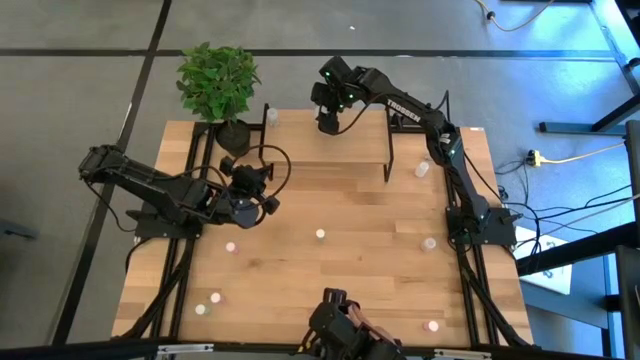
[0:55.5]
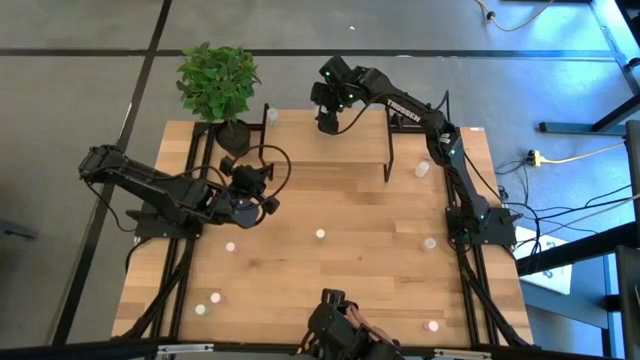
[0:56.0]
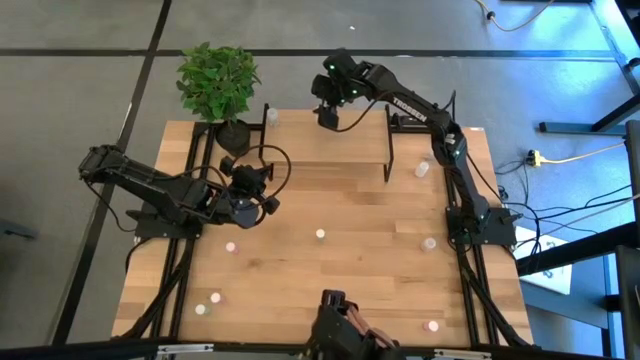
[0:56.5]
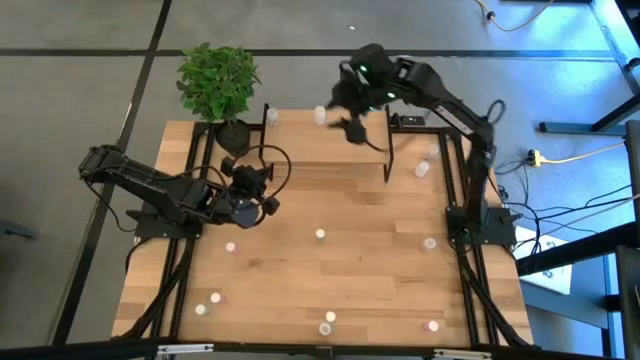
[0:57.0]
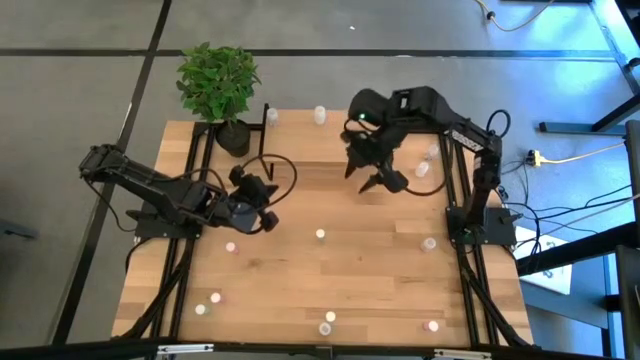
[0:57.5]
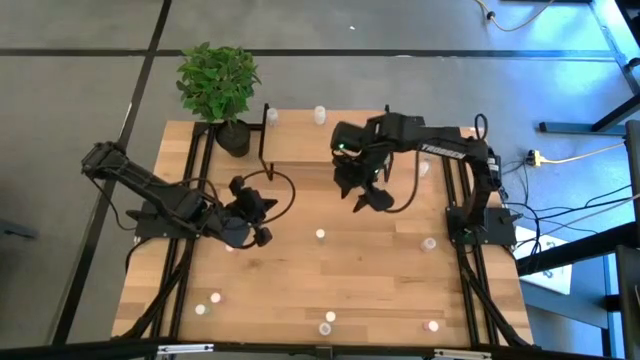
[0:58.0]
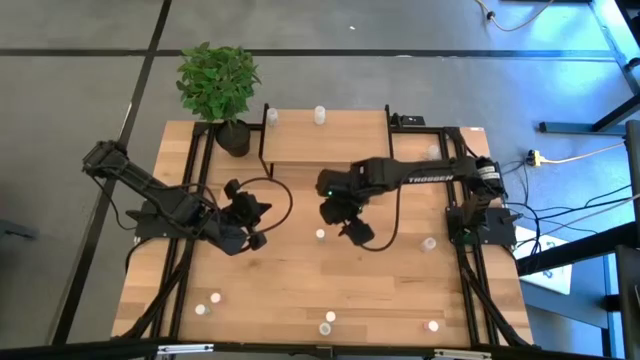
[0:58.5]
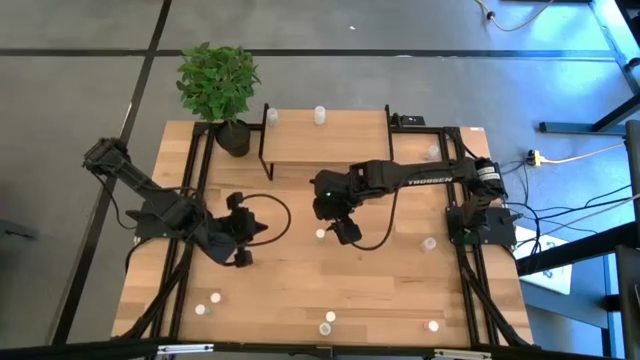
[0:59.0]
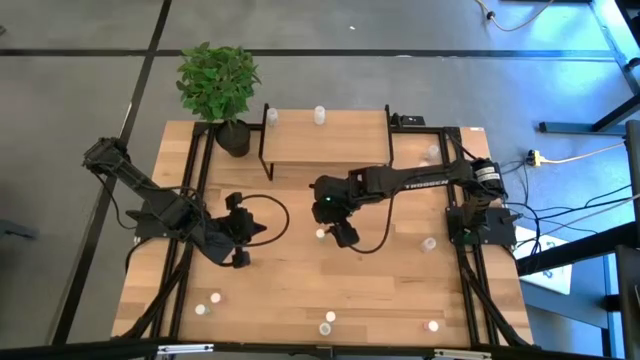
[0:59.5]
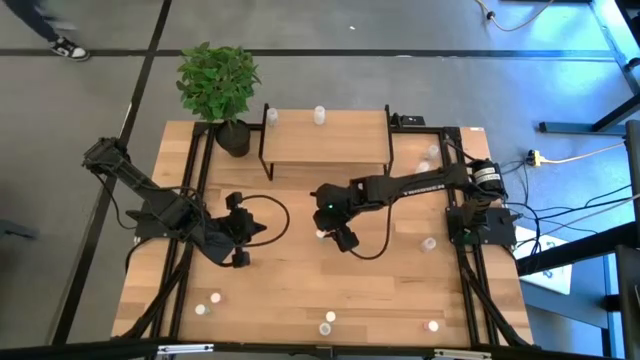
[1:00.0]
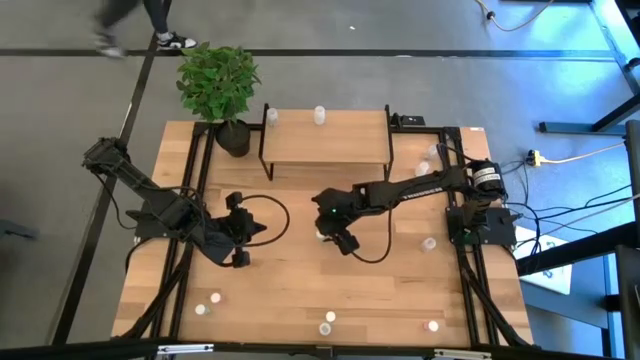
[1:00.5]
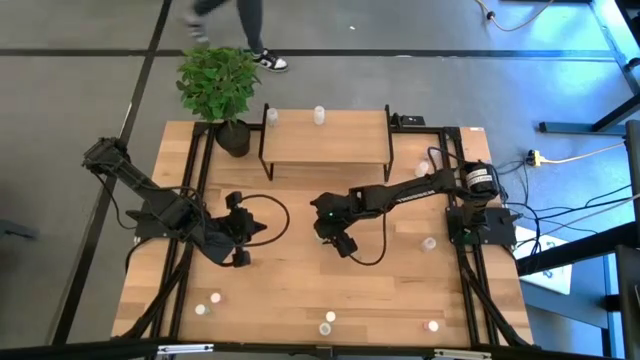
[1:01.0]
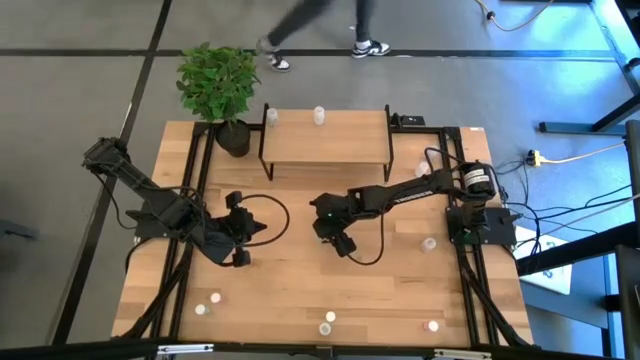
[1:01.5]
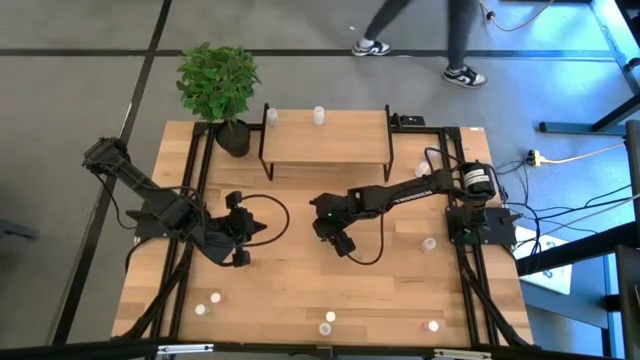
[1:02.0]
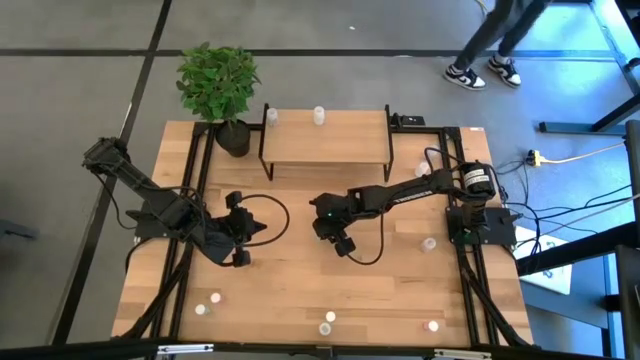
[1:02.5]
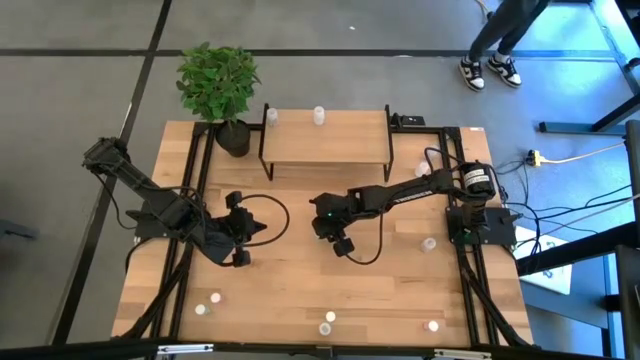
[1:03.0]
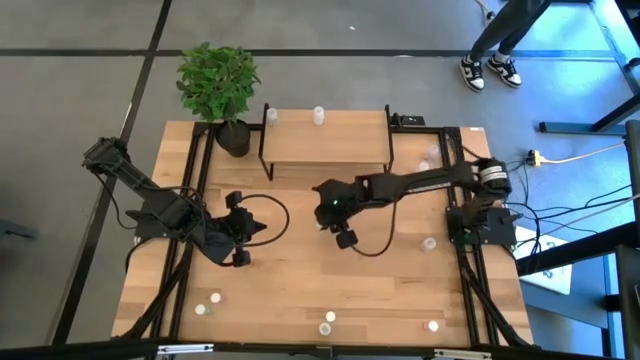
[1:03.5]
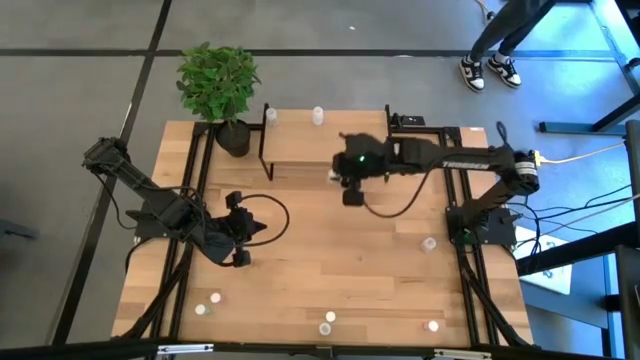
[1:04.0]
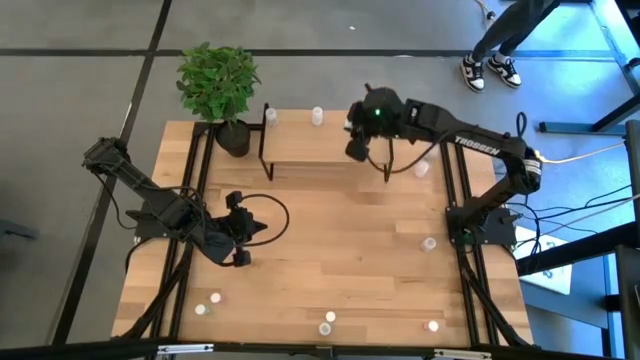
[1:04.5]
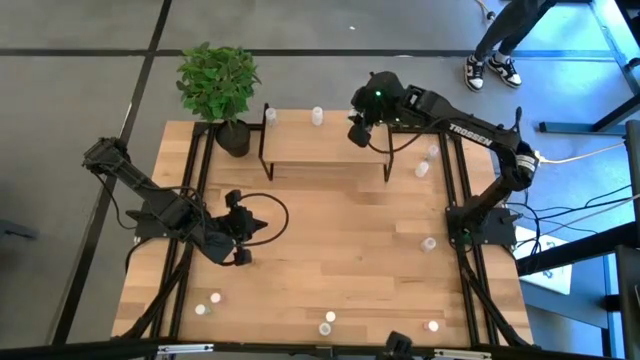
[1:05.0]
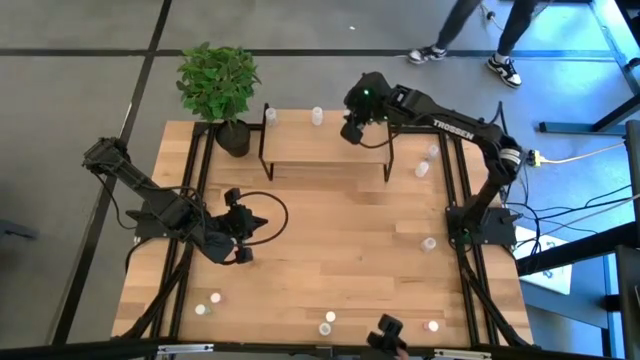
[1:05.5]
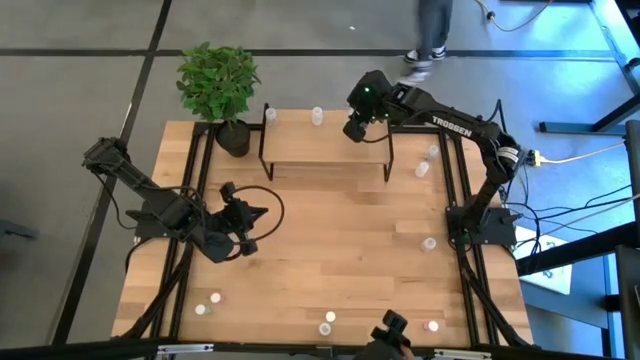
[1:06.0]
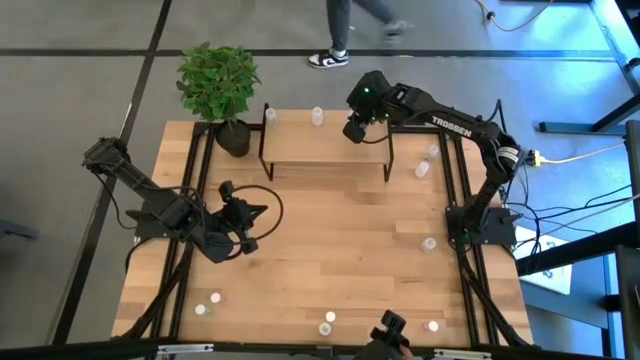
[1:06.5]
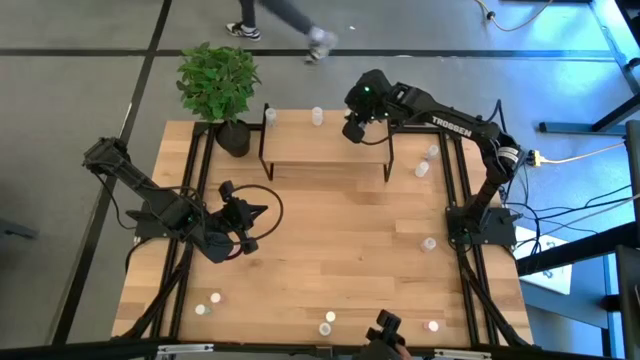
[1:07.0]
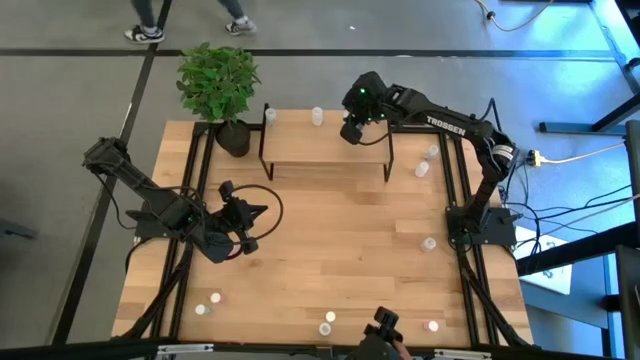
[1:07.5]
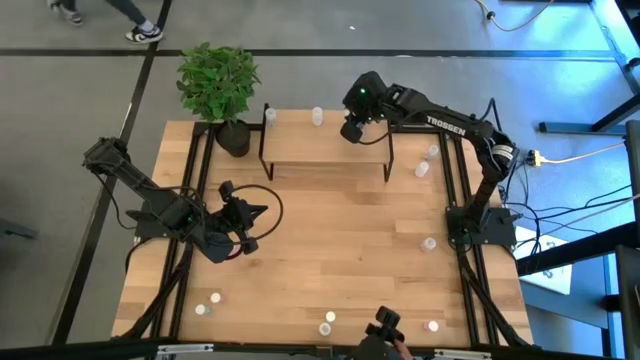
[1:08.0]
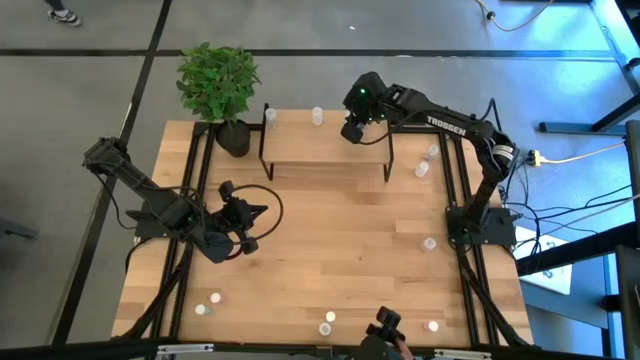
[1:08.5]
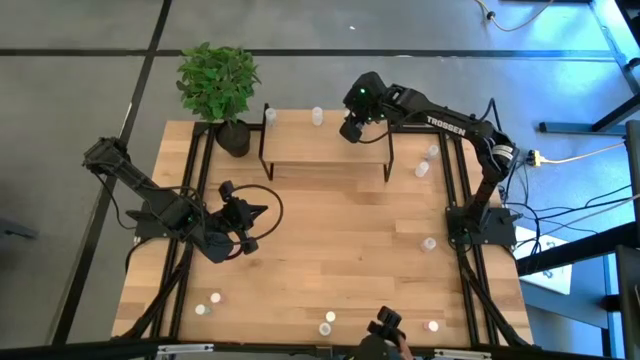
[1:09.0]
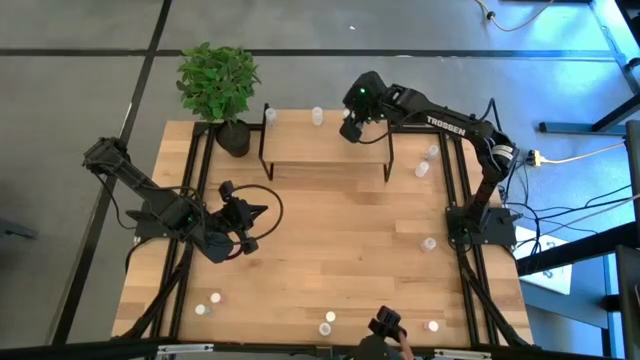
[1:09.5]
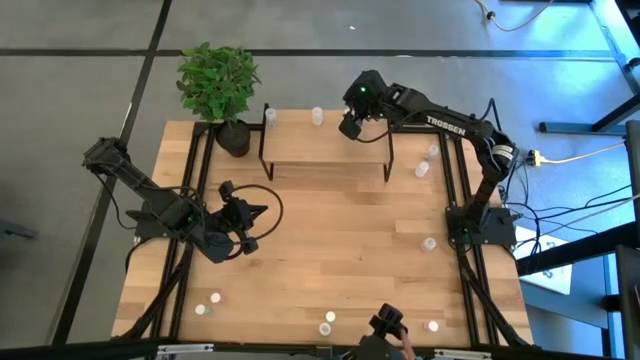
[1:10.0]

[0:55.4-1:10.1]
Task: Pick and place medicine bottles onto shelf by color
Put the center green pill bottle on the shelf

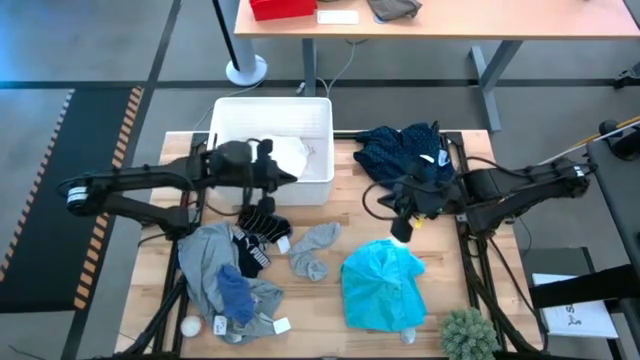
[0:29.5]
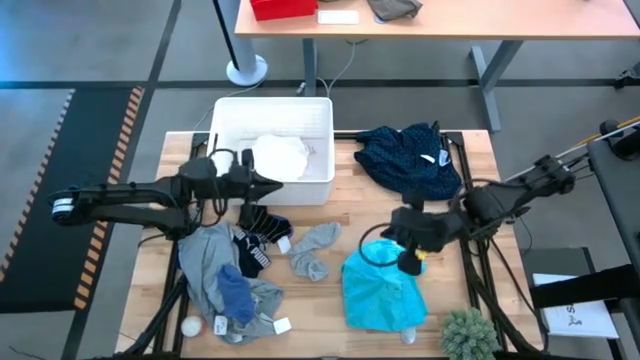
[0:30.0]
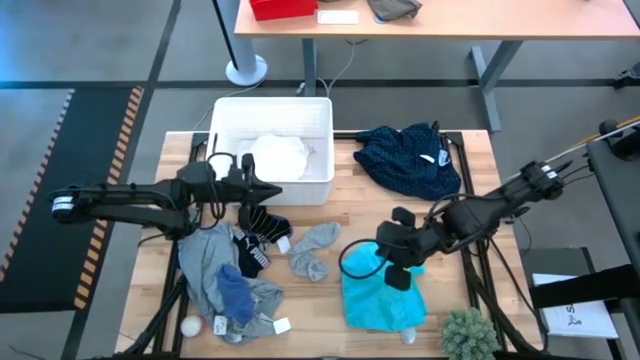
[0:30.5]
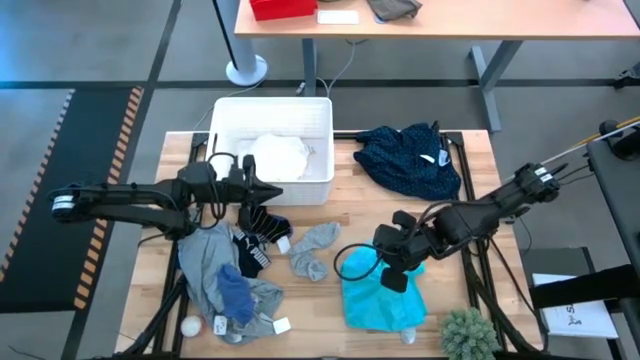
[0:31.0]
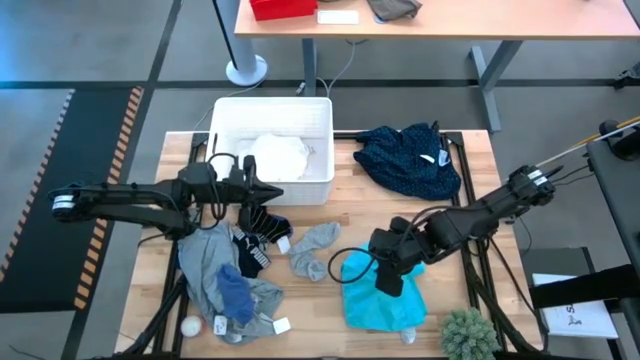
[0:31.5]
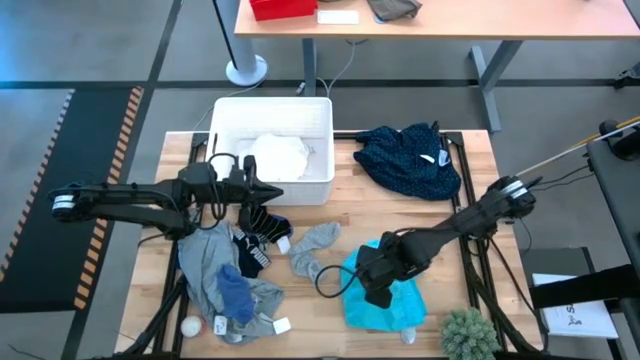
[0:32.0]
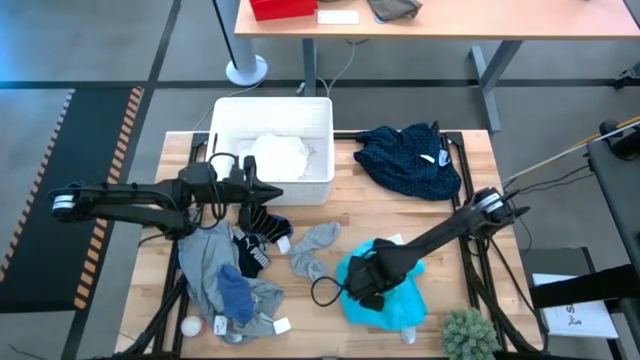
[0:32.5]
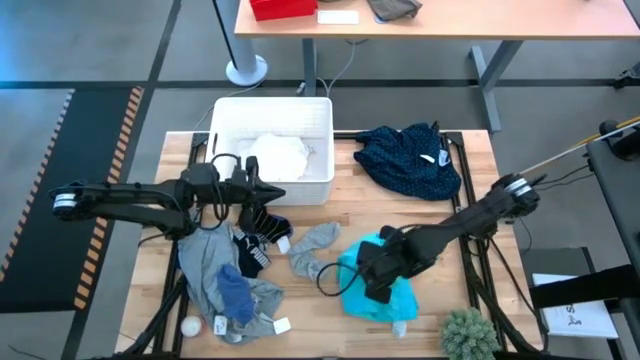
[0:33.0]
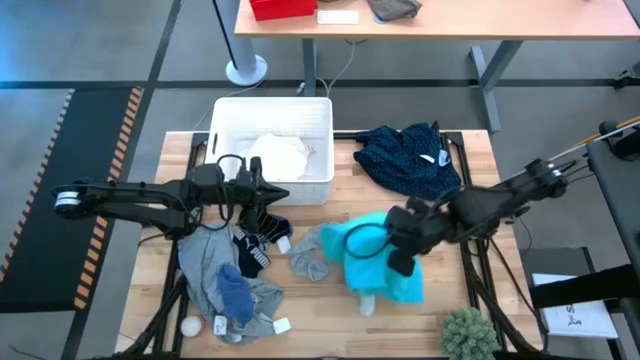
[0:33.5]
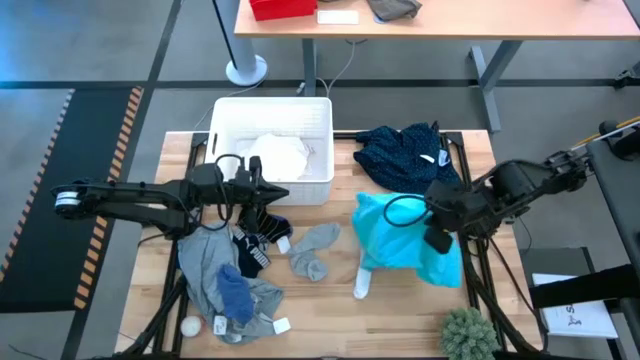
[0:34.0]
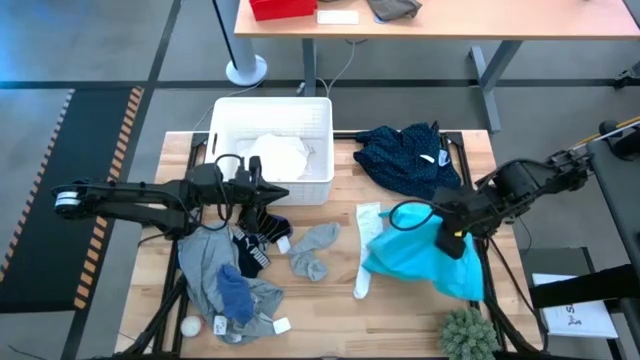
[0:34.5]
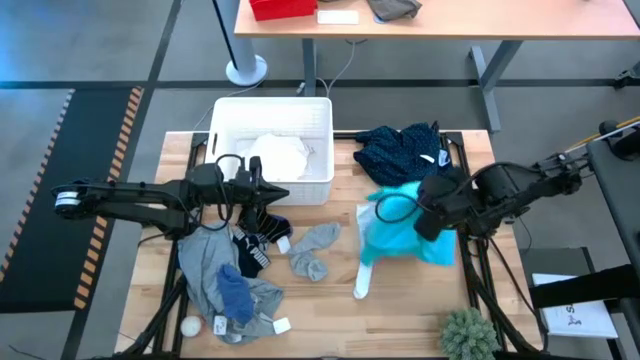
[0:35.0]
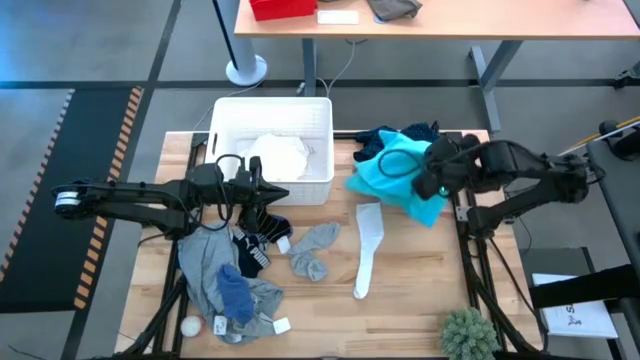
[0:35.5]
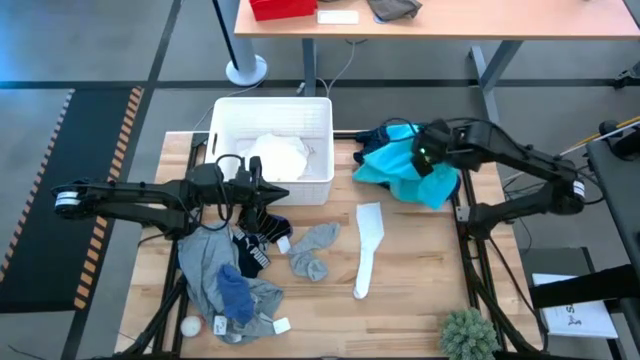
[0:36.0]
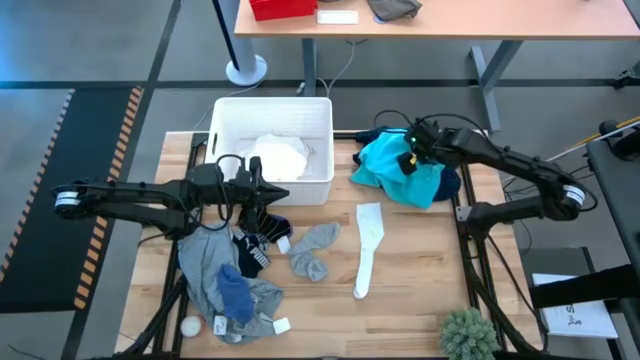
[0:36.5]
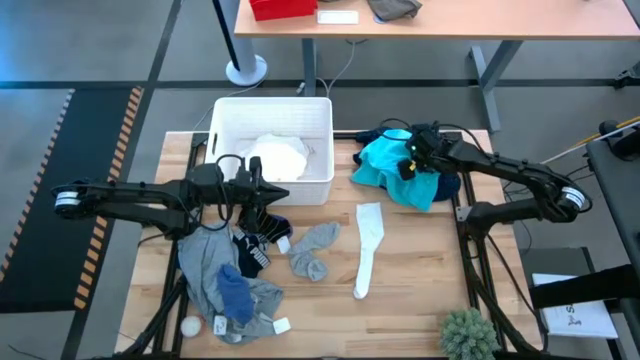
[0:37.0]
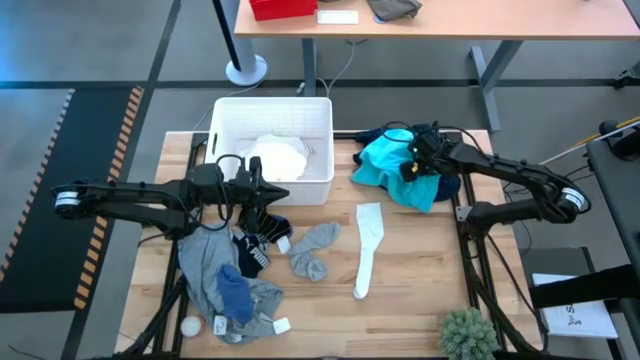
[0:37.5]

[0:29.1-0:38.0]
Task: Sort clothes
Move the light blue shorts to the top right of the table
